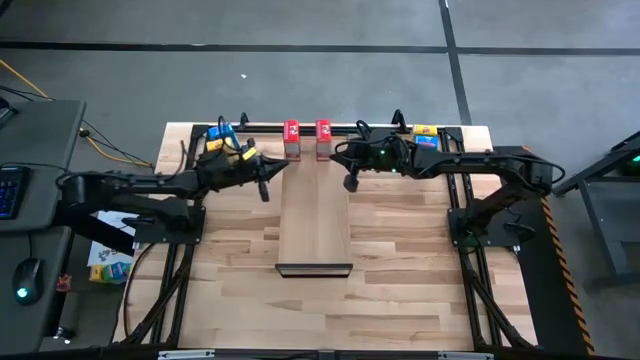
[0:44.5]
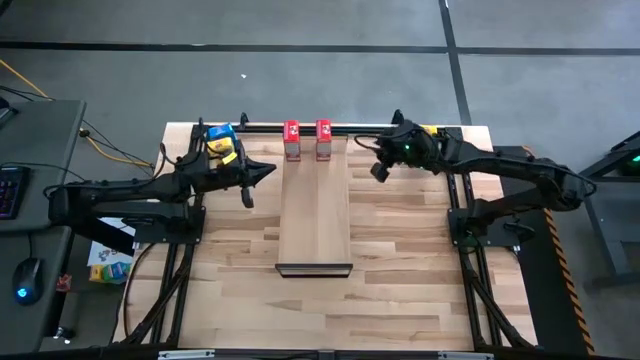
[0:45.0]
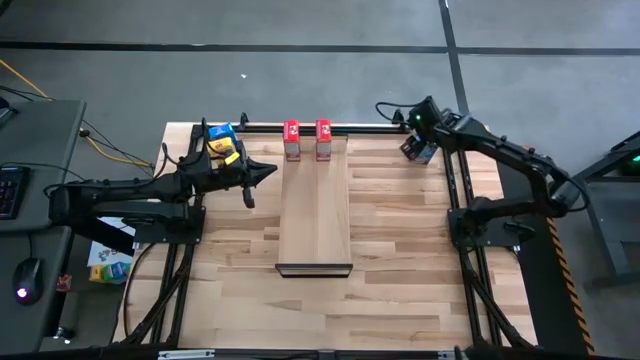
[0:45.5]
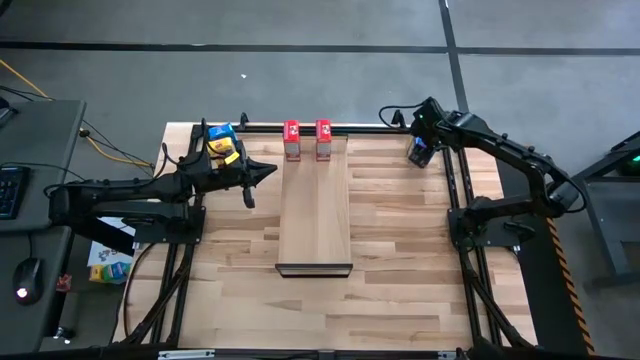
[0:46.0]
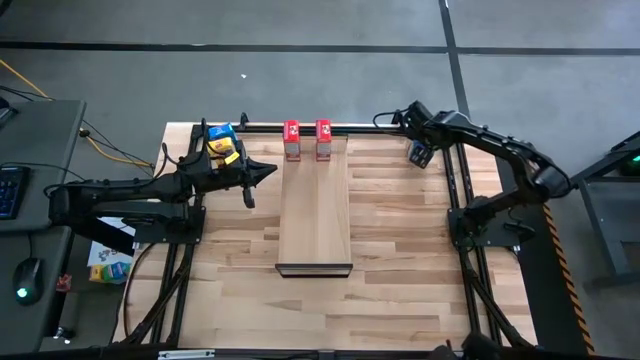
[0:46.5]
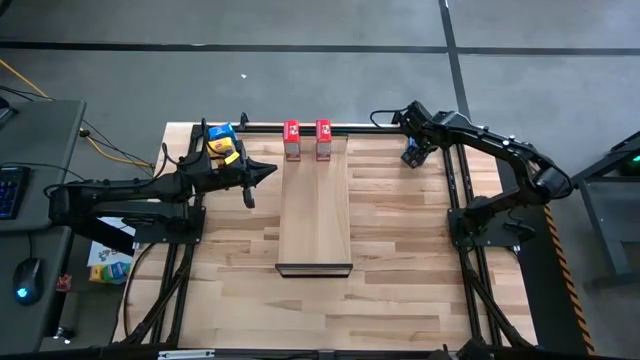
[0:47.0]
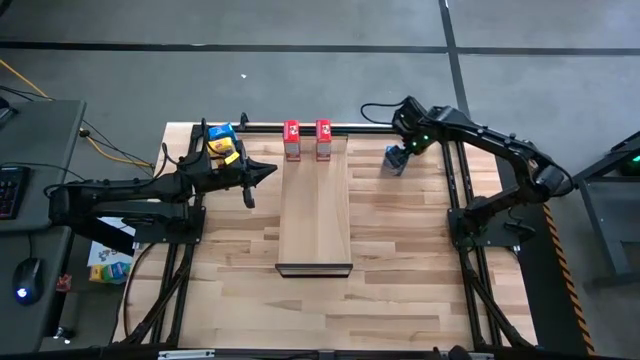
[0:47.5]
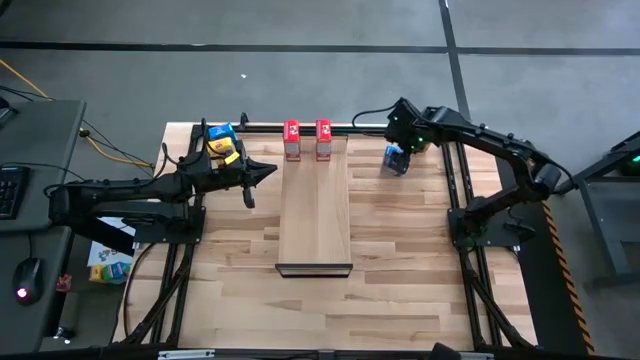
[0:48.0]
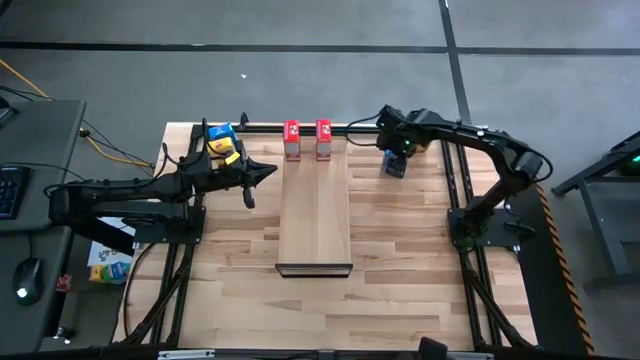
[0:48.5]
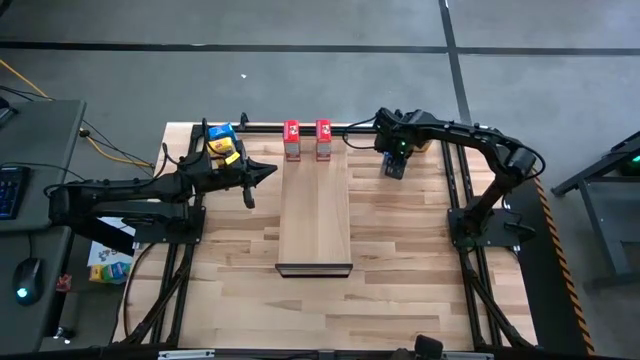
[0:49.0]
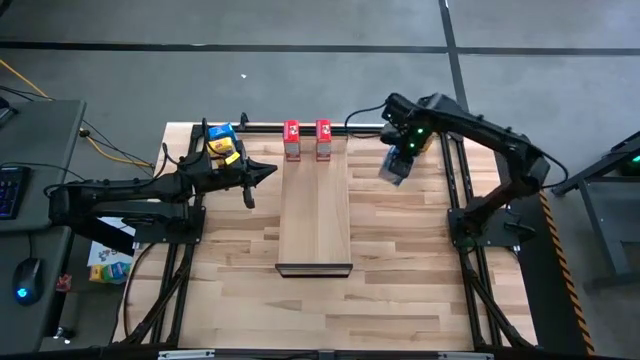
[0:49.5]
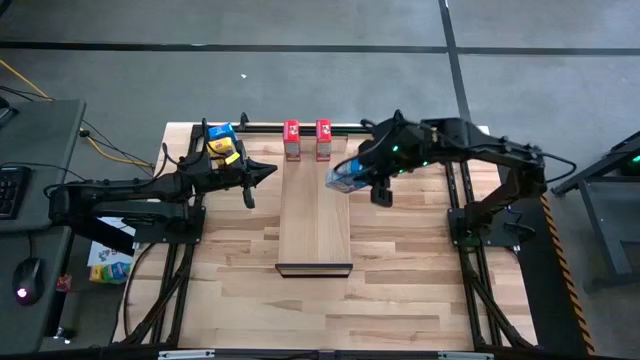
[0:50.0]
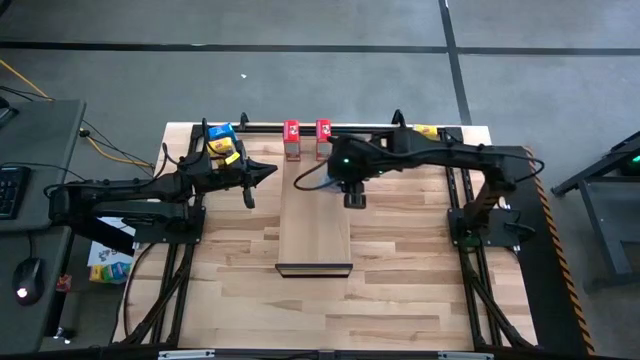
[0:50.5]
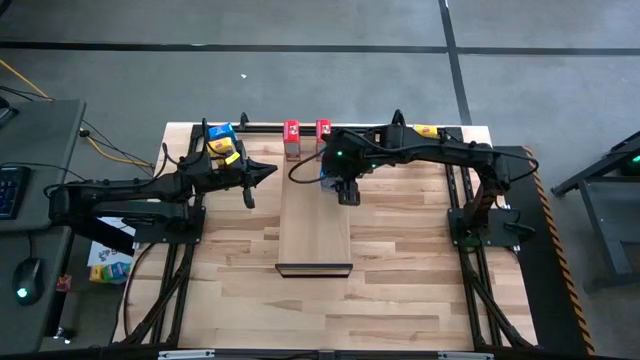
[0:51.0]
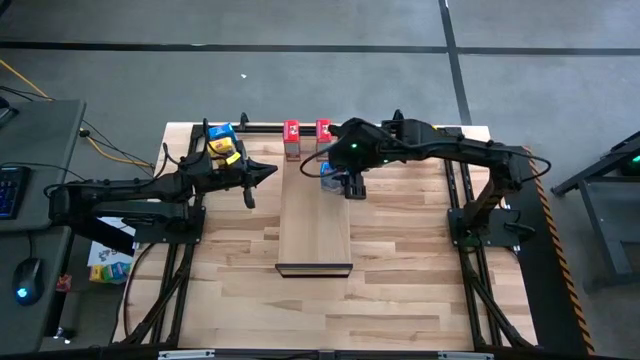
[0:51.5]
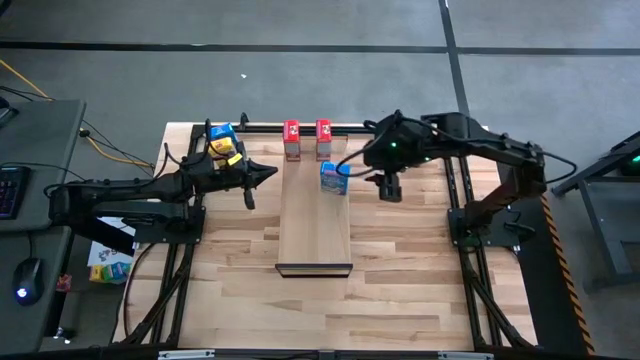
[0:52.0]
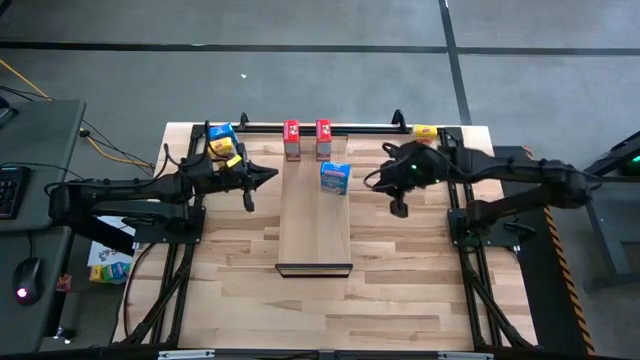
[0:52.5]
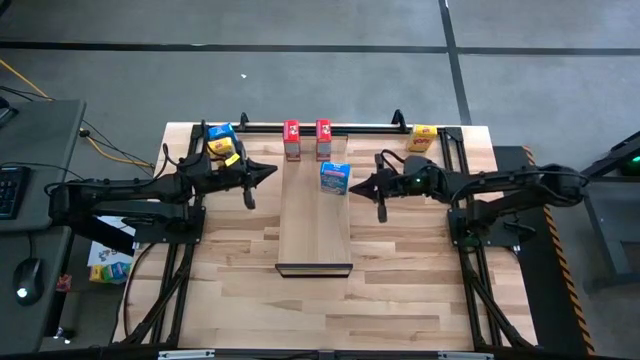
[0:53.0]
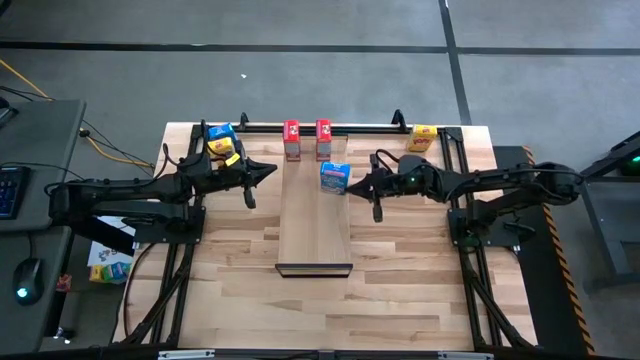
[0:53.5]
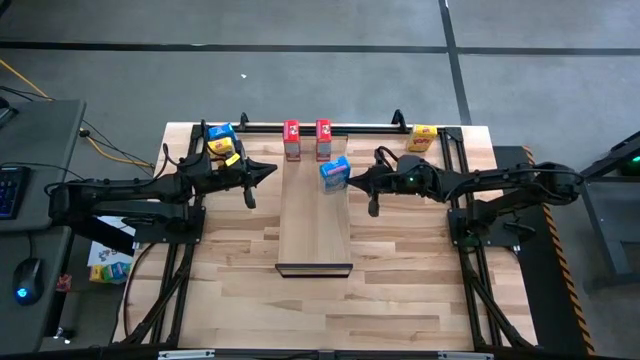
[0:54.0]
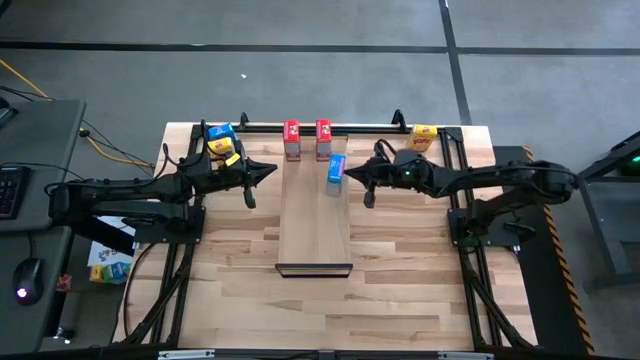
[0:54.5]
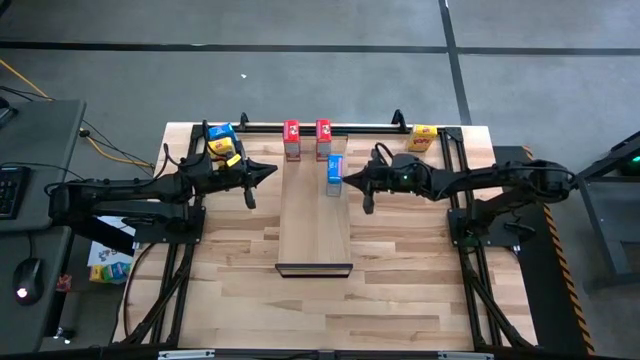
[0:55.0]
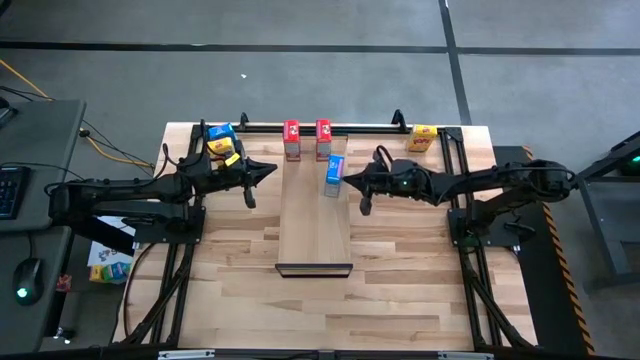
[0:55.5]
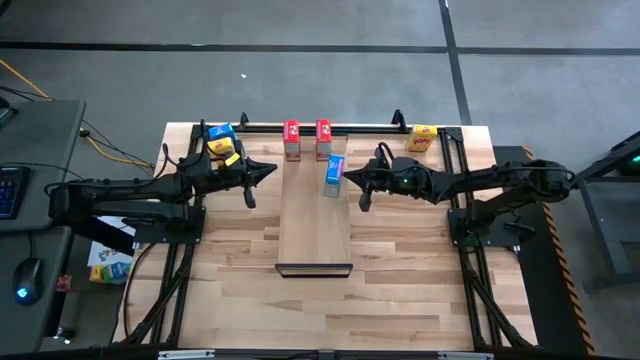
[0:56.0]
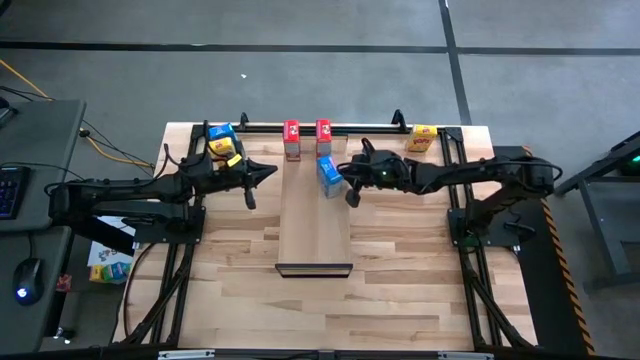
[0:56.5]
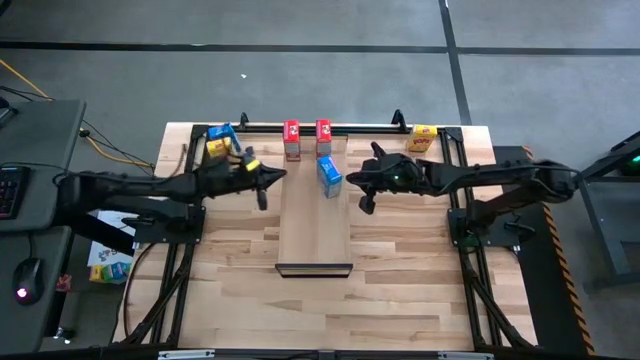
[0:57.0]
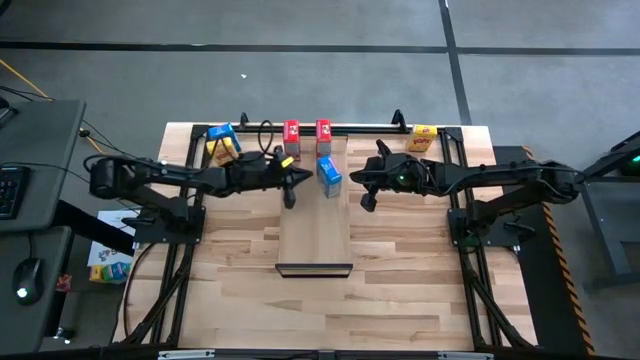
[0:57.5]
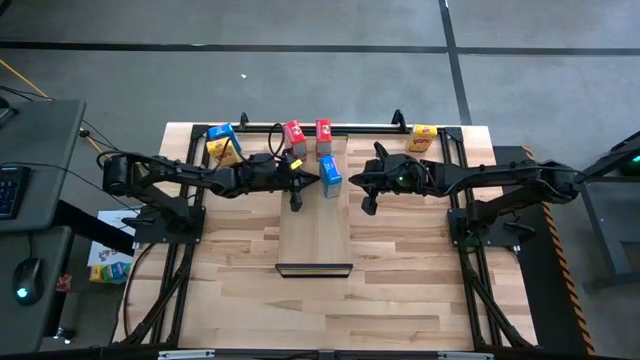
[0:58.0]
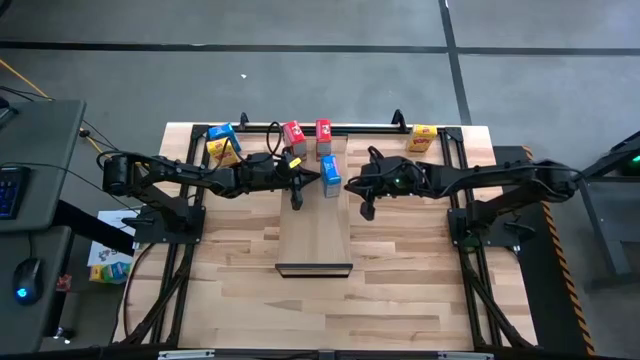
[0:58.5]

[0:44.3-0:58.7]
Task: Stack cereal on shelf
Put the right blue cereal box on the shelf

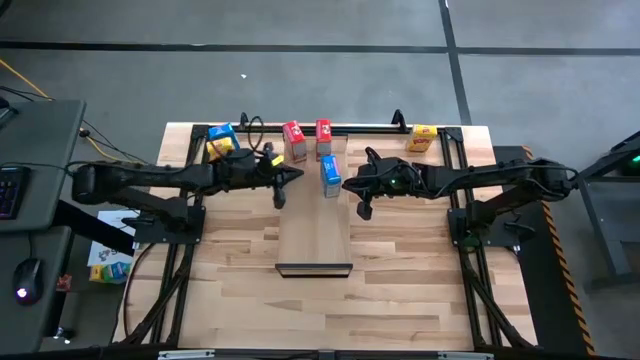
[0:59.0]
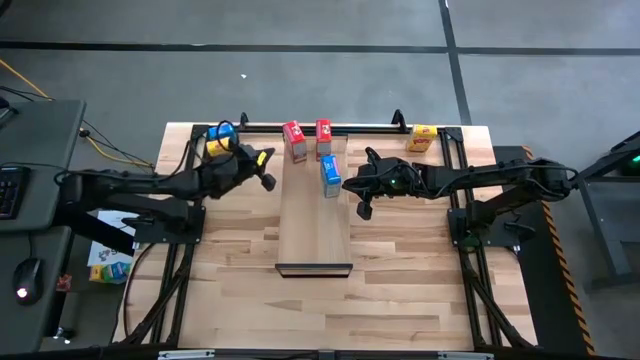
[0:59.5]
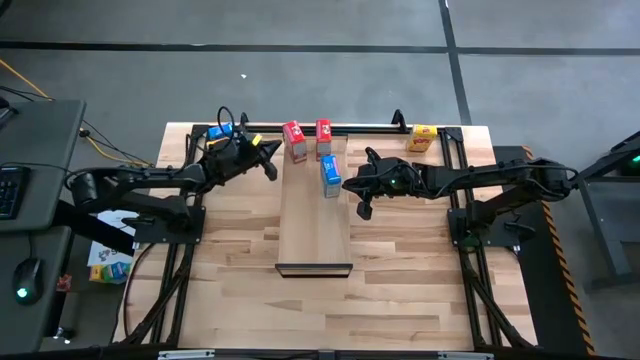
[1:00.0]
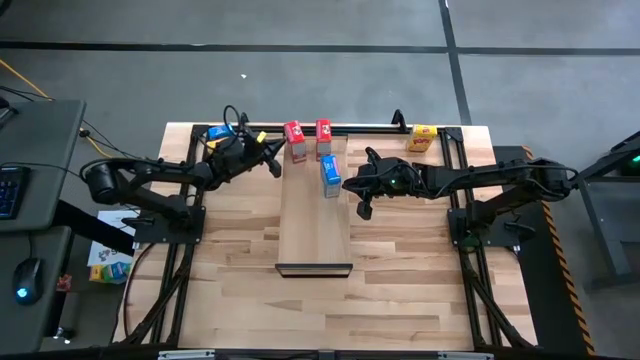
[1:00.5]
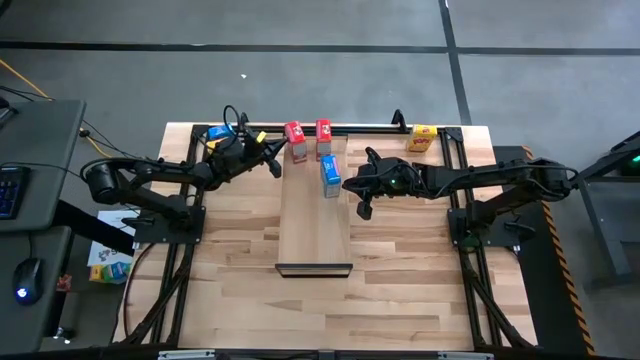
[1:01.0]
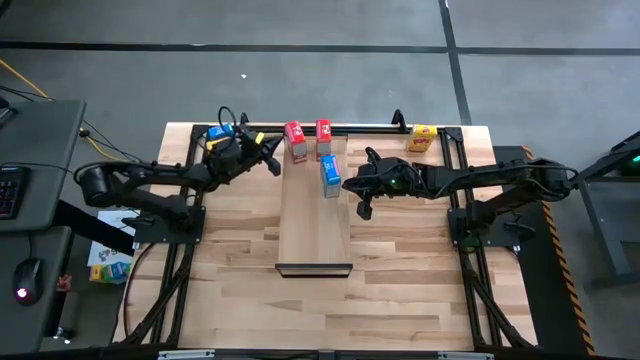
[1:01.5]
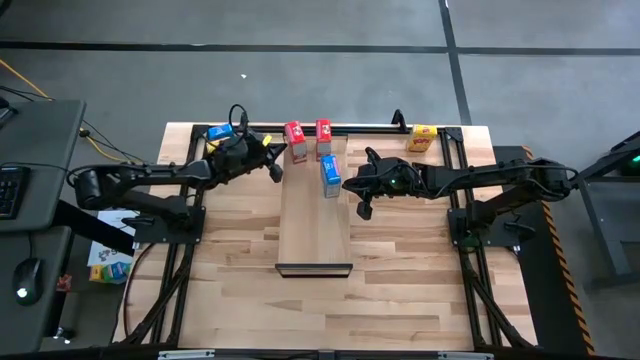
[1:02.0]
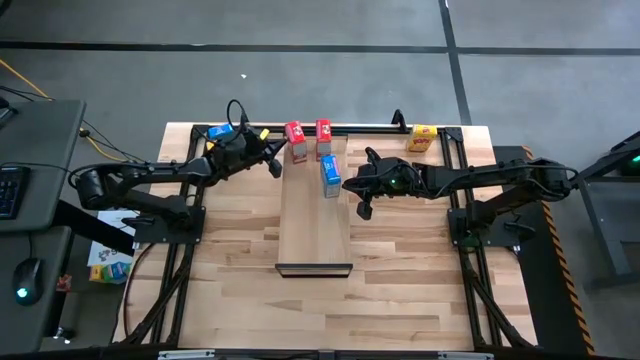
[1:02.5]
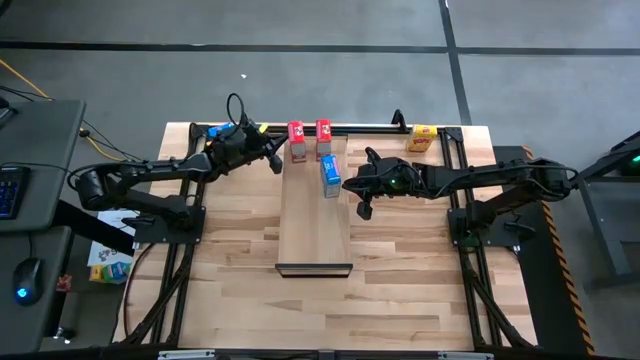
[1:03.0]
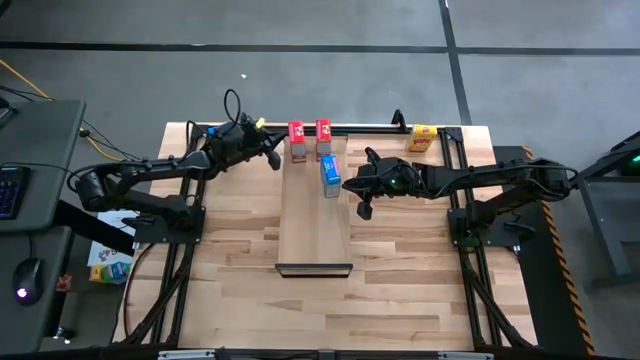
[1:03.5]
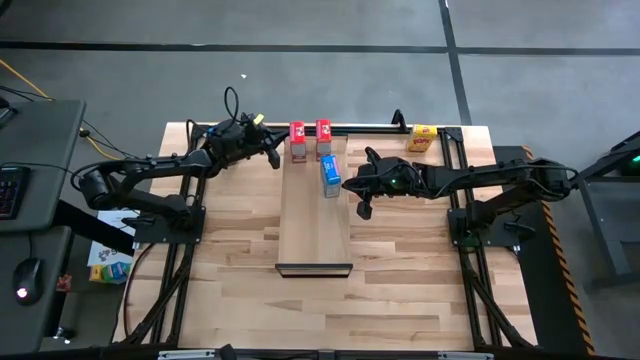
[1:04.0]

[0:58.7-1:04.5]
Adjust the red cereal box on the shelf

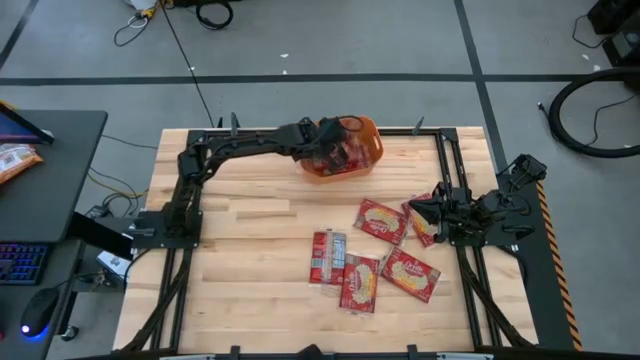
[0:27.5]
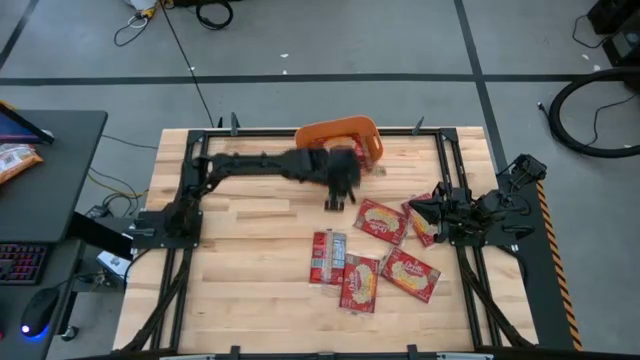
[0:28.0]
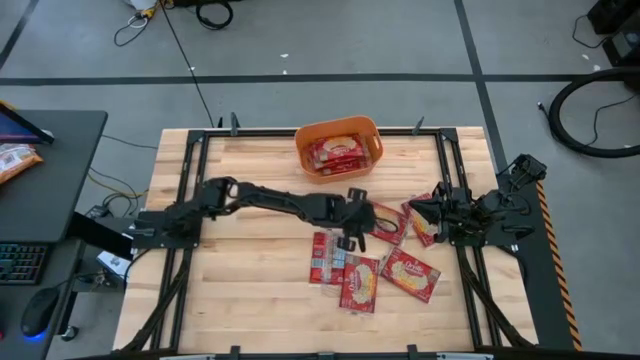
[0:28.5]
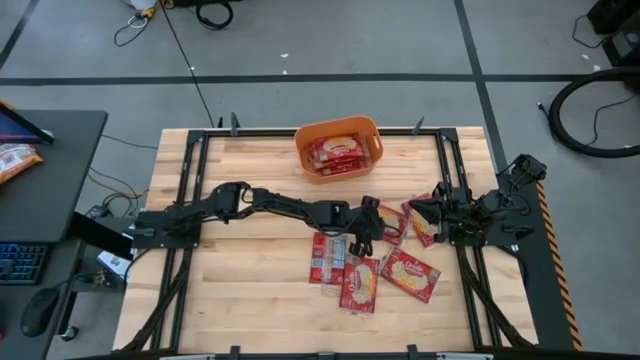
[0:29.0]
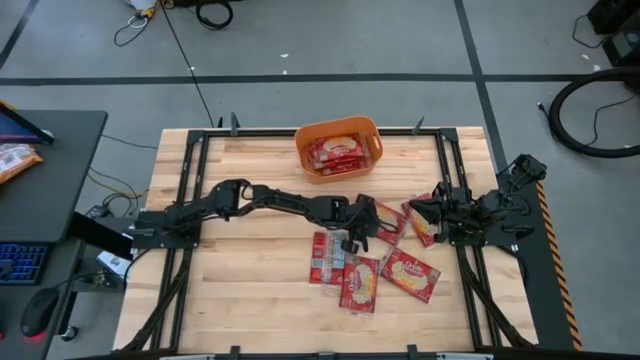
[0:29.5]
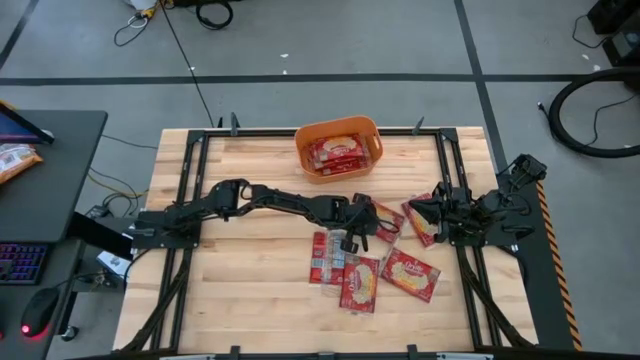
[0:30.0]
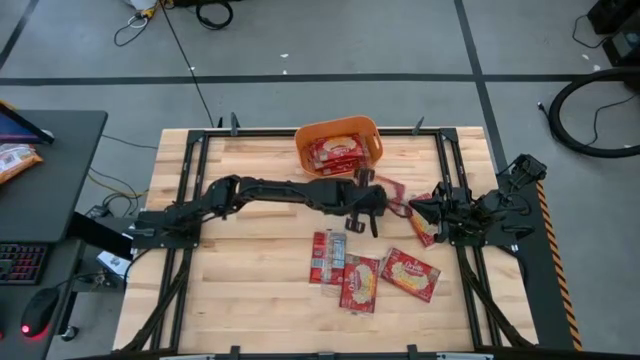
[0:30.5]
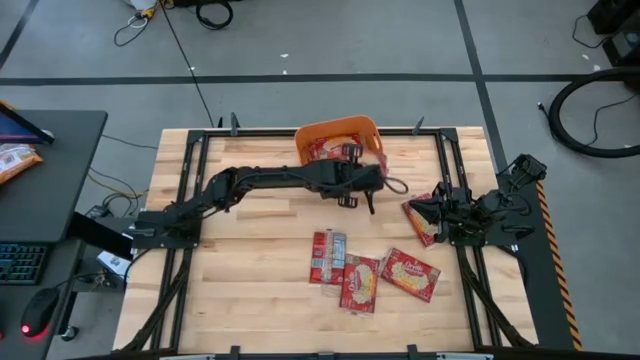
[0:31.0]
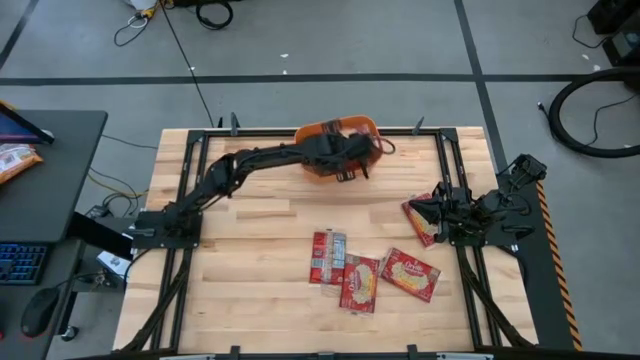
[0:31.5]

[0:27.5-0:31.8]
Task: Sort popcorn bags into baskets
Stack the popcorn bag on top of the stacked popcorn bag into the bin
